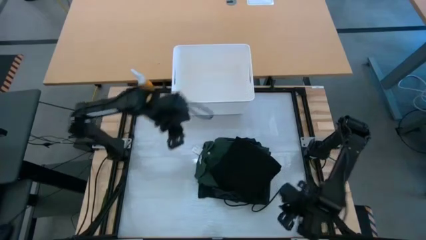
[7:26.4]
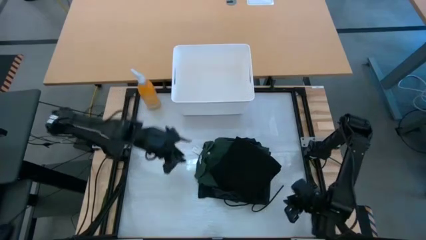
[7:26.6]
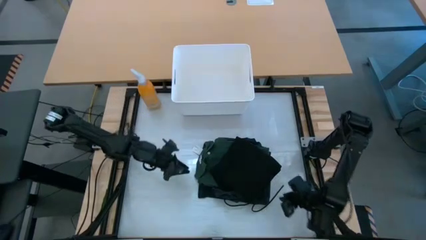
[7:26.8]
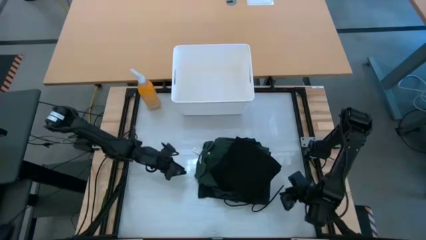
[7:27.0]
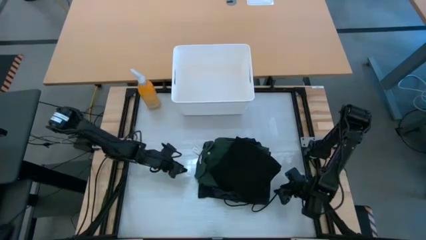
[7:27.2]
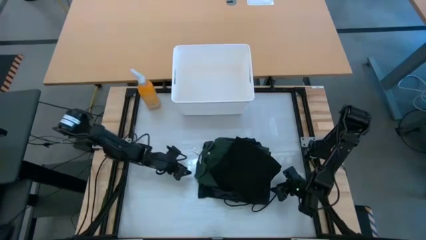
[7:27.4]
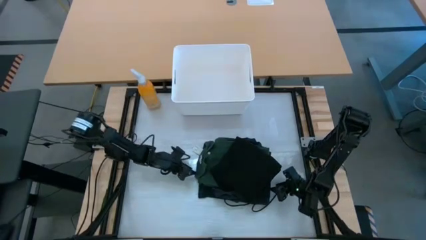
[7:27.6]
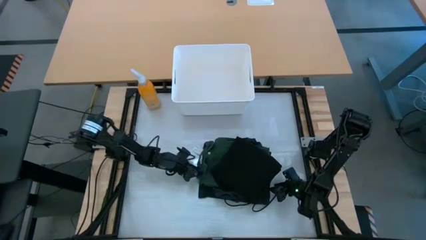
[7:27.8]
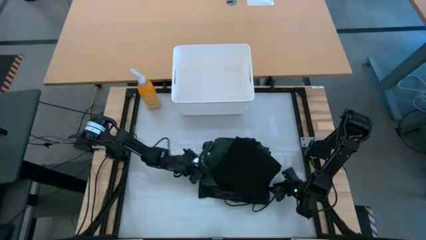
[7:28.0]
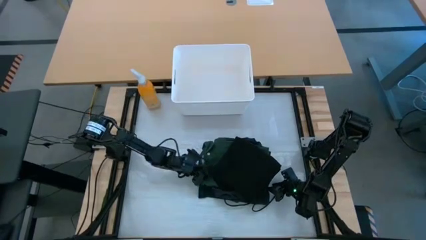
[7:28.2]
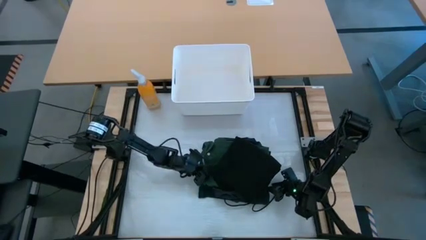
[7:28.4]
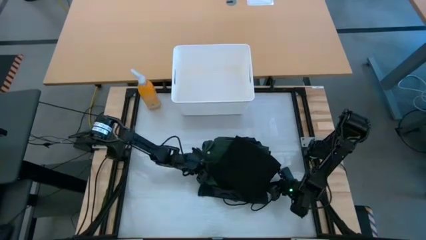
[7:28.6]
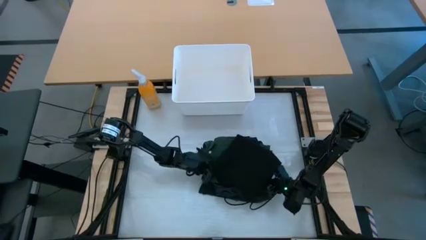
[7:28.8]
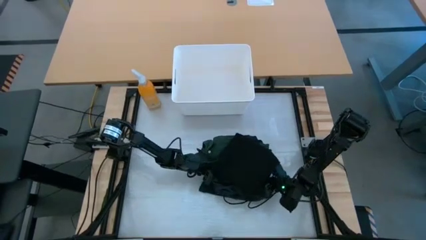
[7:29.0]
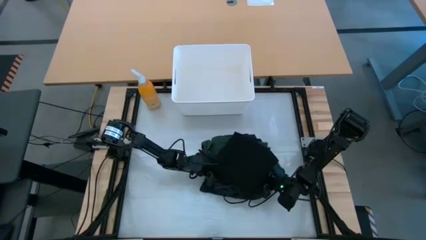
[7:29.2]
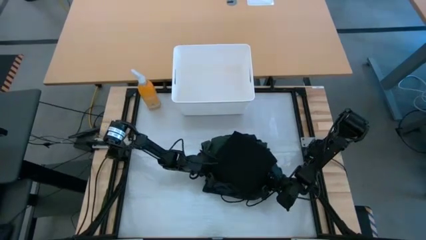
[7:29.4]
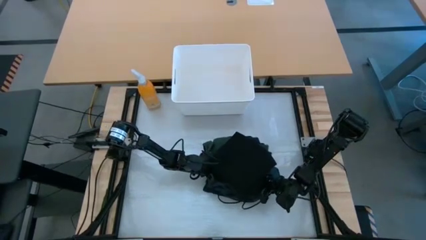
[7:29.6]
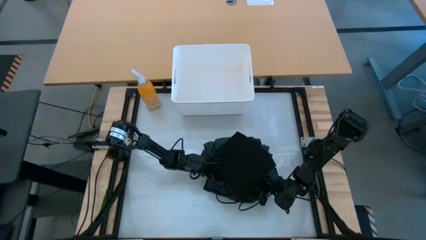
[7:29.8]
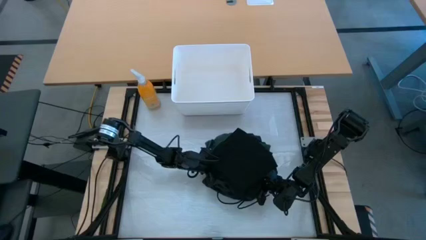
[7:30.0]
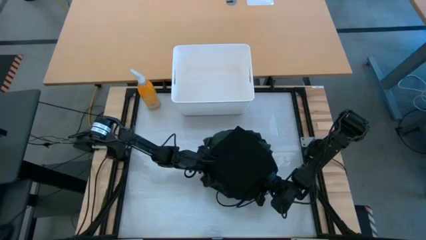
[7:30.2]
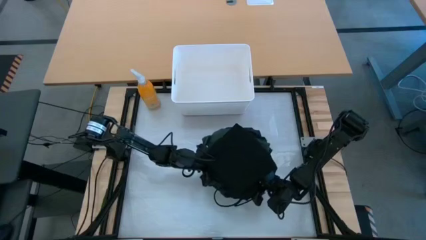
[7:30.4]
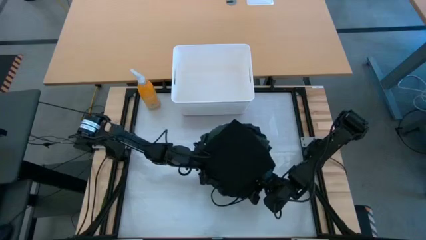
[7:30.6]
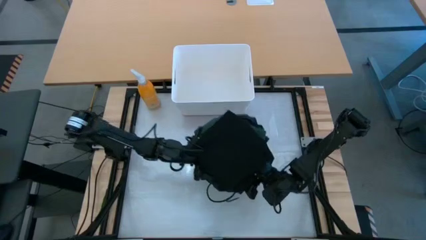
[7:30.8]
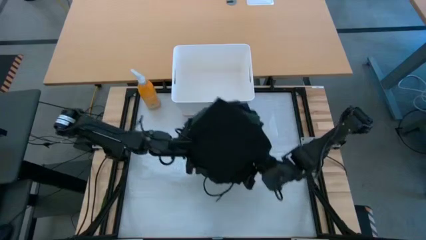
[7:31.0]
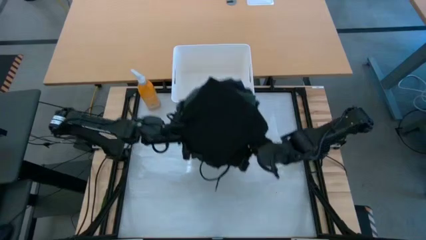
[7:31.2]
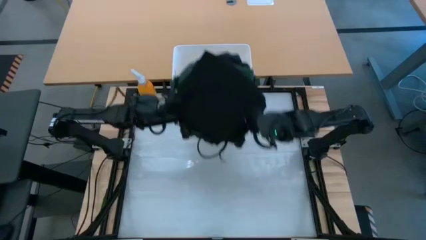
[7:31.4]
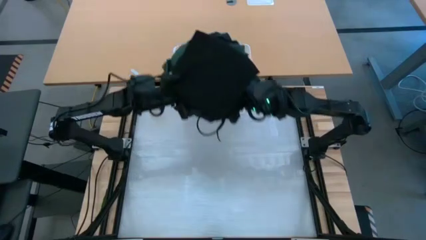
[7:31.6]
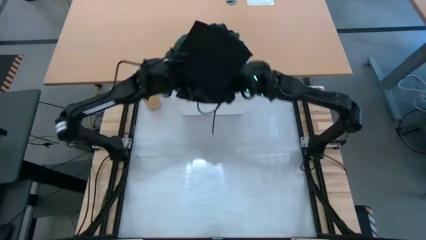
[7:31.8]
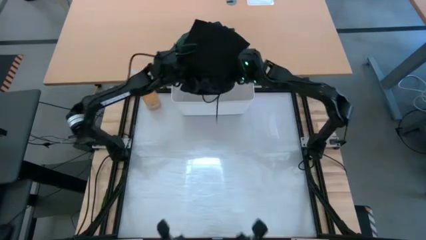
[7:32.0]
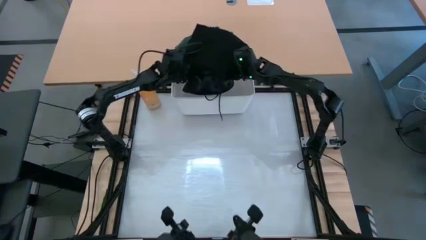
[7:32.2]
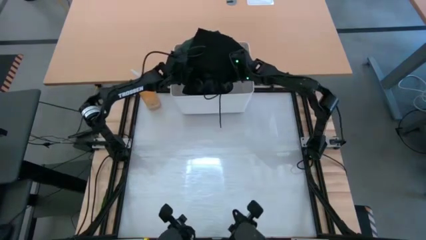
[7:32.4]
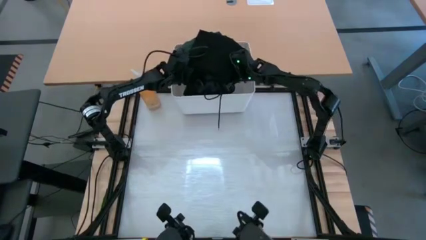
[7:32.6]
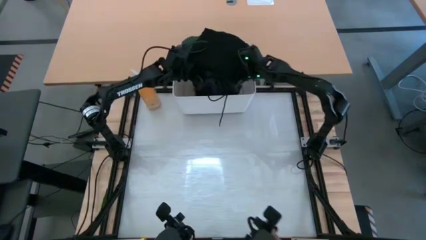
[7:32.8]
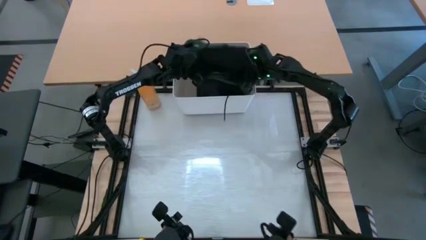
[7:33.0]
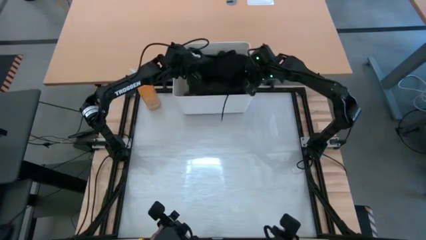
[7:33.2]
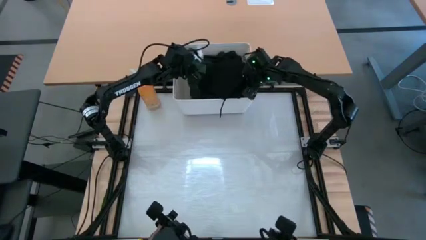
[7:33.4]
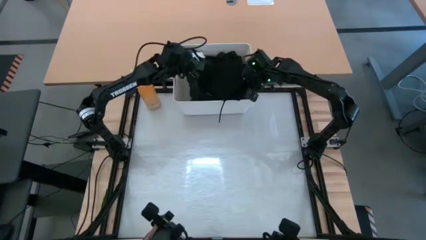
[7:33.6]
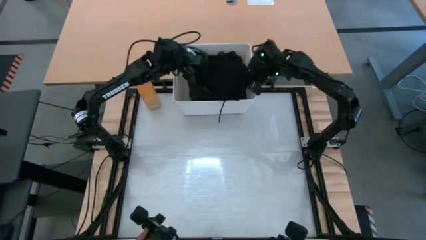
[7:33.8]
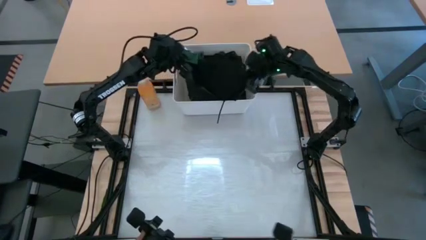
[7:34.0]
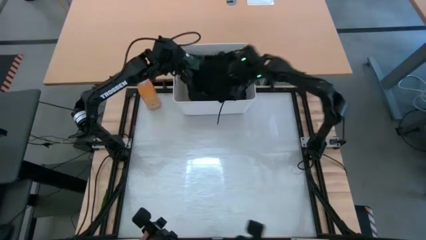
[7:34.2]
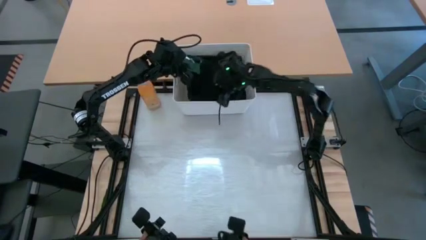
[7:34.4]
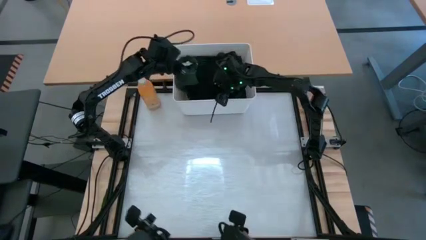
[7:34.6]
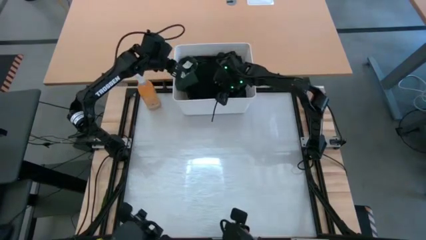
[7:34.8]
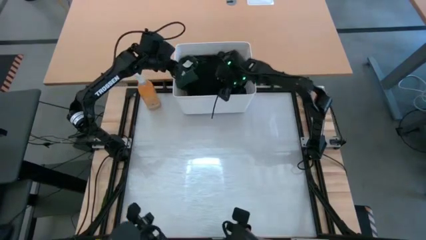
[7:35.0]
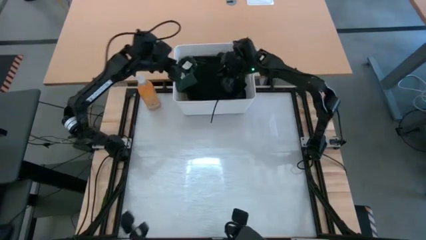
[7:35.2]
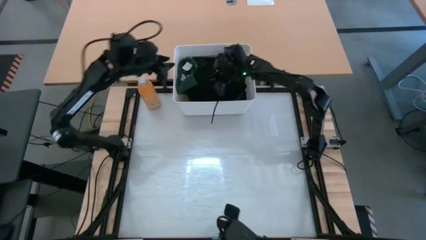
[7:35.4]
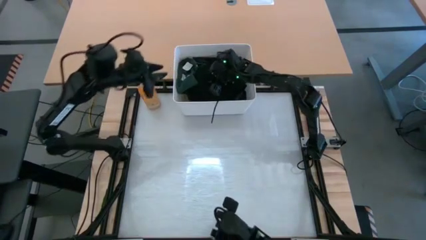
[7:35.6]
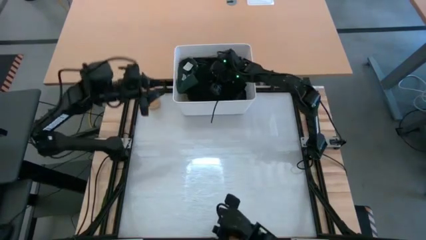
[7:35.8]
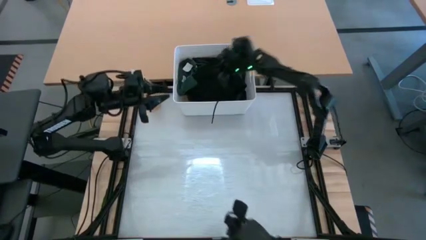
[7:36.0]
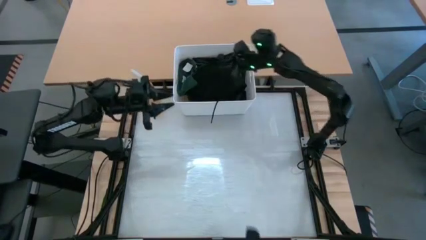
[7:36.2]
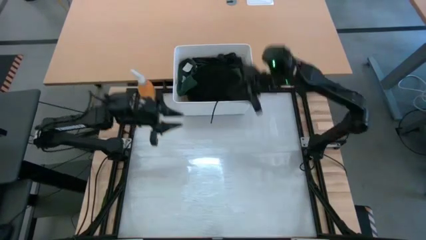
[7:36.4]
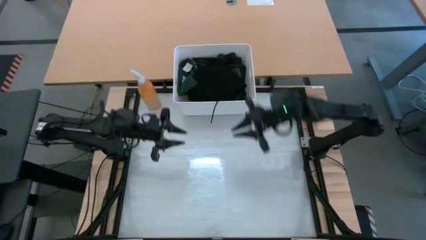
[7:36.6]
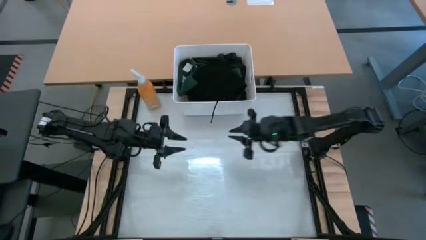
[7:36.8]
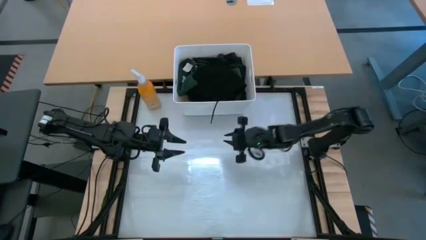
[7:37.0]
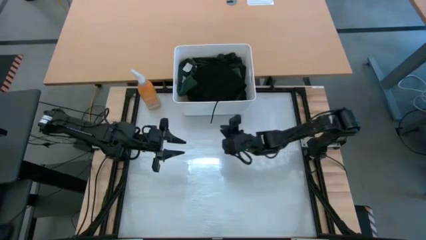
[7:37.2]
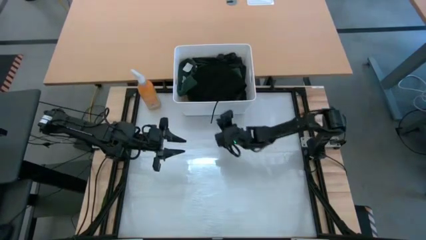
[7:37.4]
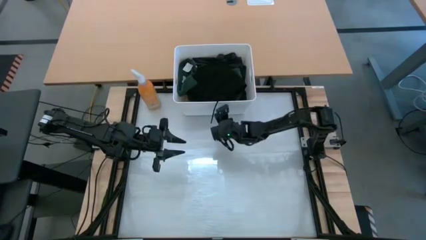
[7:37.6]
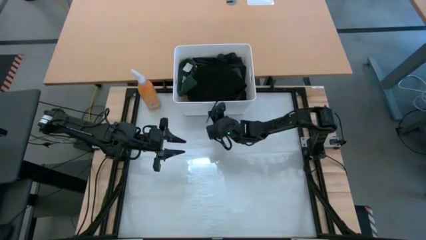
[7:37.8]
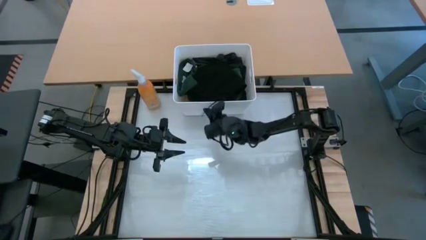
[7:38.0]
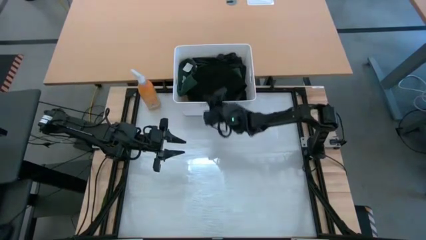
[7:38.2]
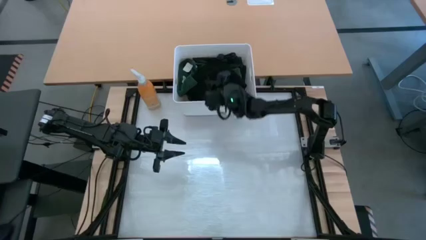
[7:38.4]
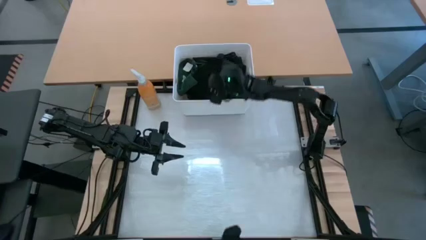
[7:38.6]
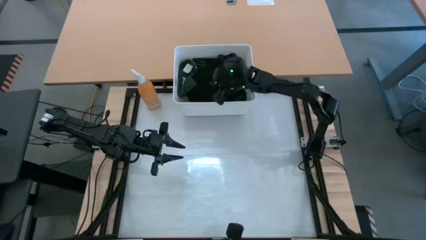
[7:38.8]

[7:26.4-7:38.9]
Task: Fold laundry
Put the stack of clothes into the white bin

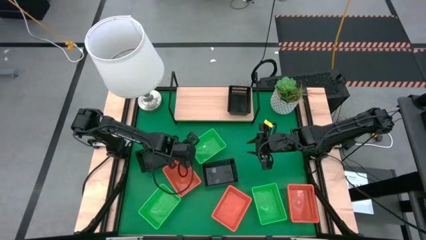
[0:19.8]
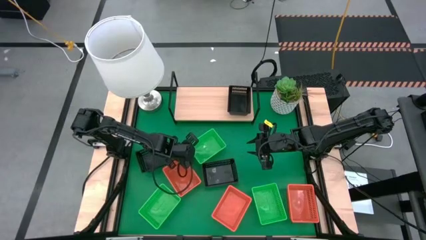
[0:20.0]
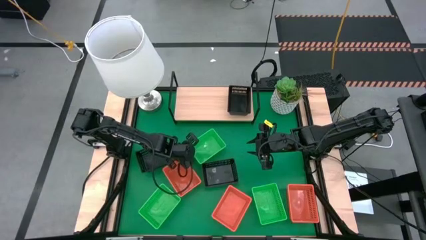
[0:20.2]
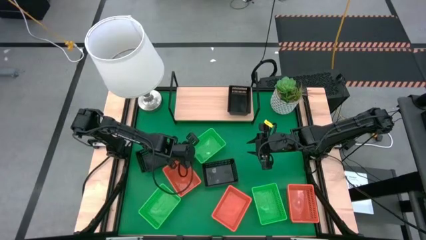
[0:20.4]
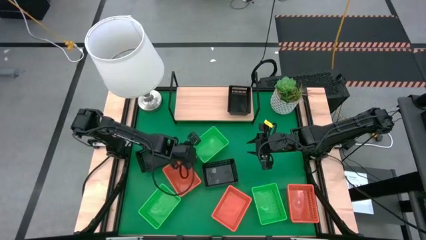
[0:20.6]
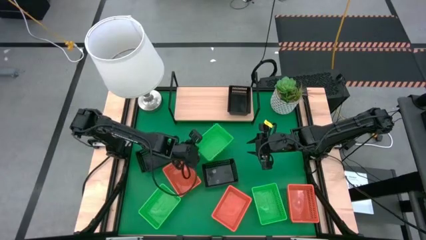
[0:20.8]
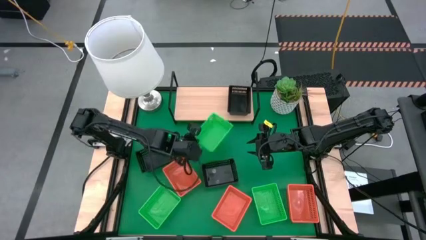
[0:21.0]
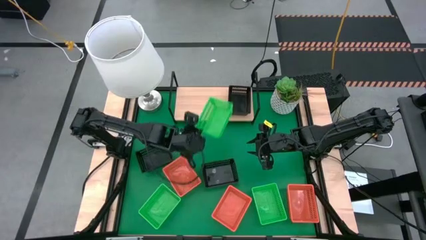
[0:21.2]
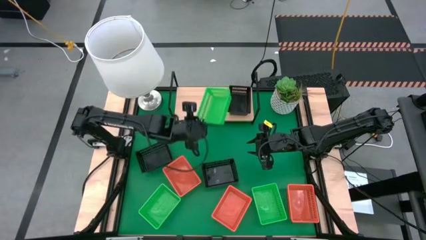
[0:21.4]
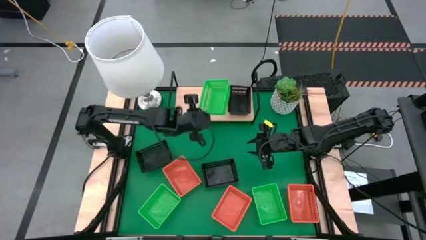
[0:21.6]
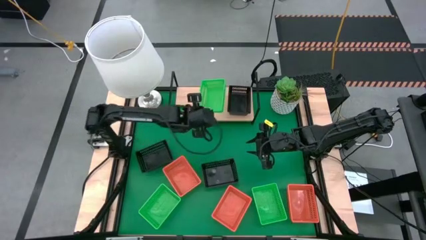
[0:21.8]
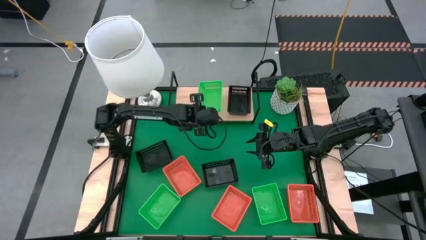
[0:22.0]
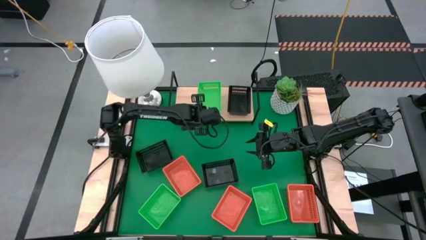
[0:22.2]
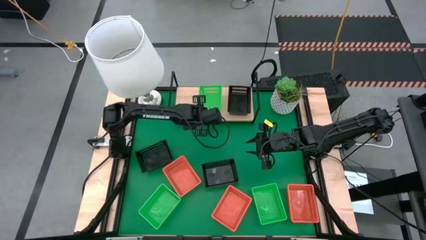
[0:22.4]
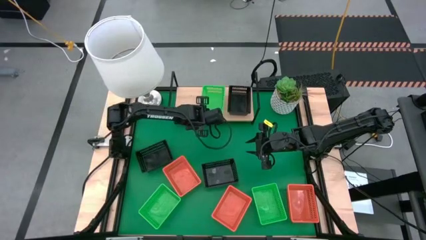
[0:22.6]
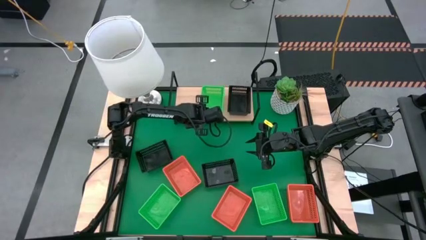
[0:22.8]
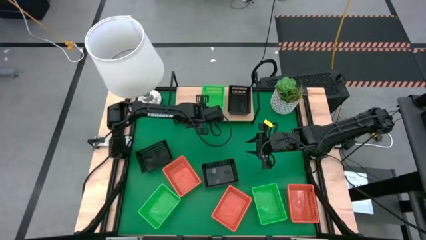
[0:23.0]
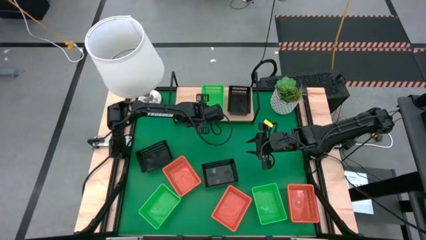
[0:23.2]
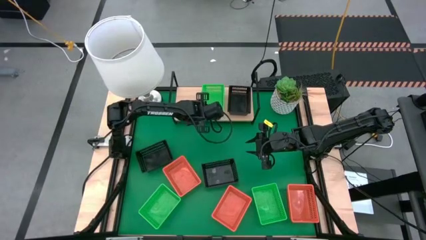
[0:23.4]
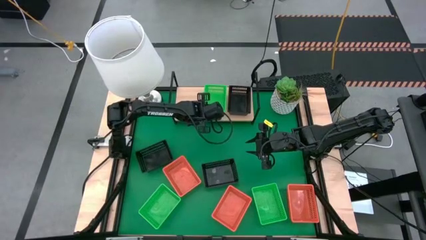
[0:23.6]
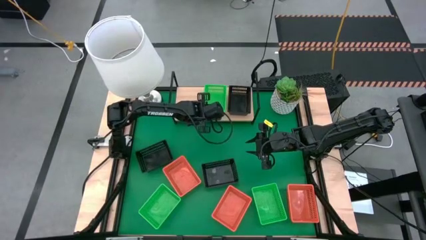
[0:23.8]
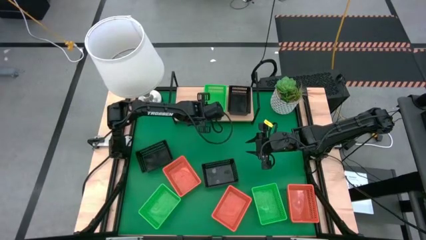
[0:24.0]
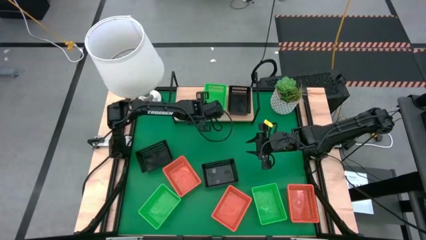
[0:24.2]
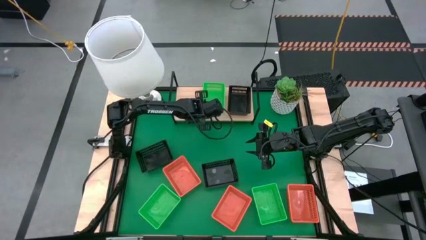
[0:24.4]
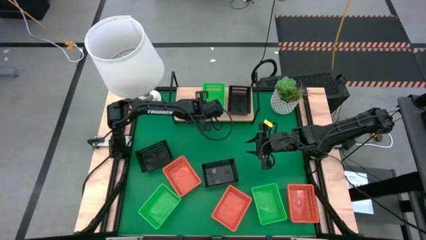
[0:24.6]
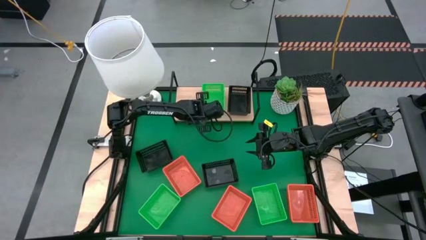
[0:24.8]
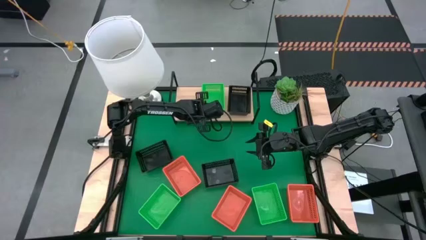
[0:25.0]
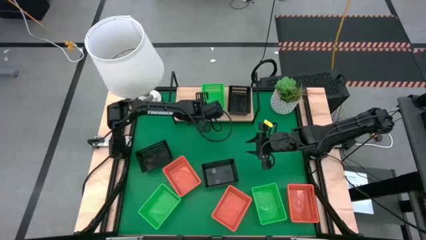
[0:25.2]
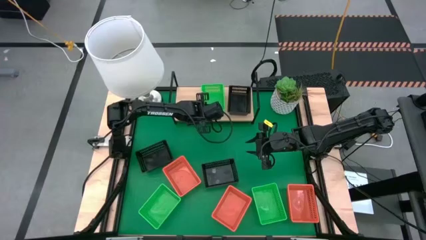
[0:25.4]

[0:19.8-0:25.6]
Task: Stack baskets on shelf by color
Put the top green bin on the shelf
